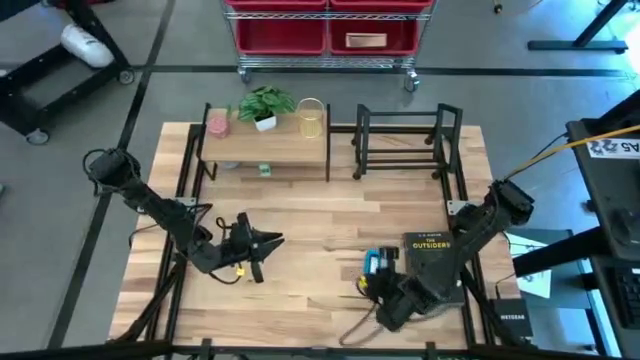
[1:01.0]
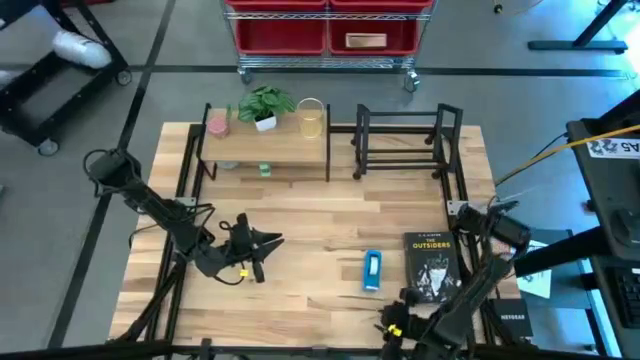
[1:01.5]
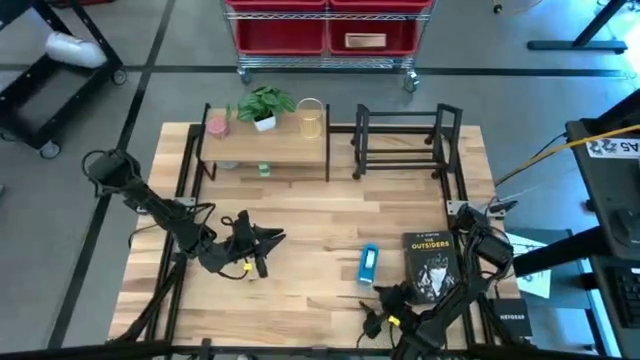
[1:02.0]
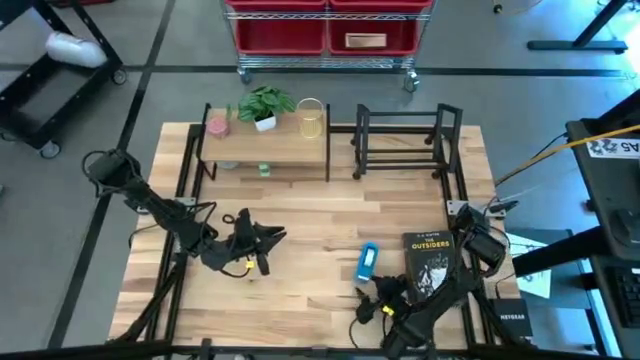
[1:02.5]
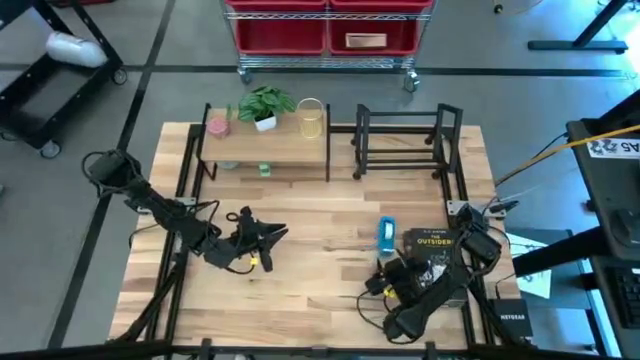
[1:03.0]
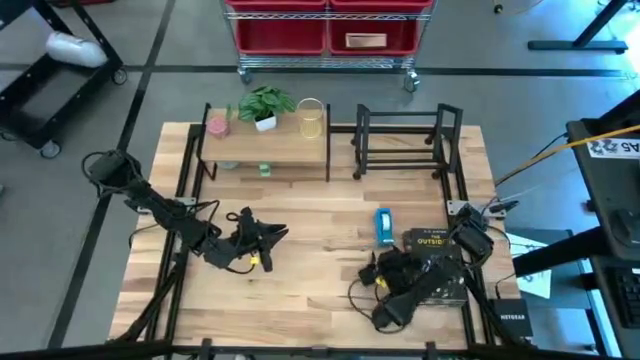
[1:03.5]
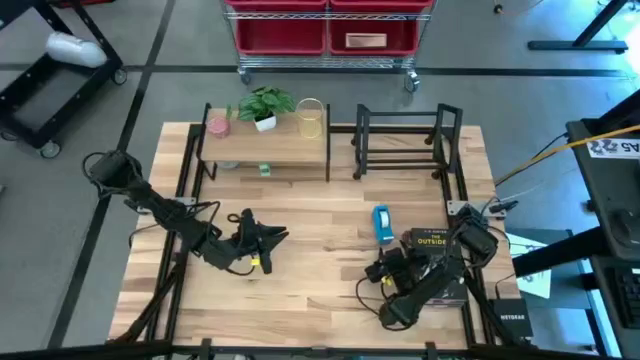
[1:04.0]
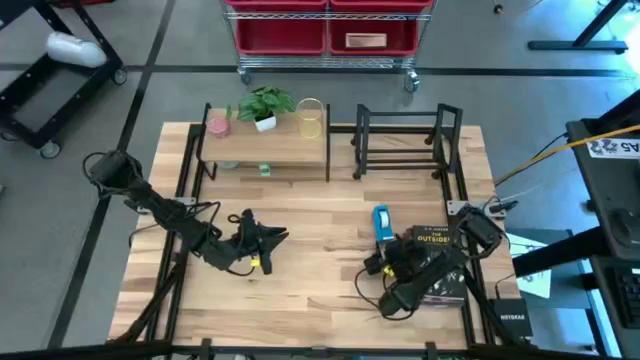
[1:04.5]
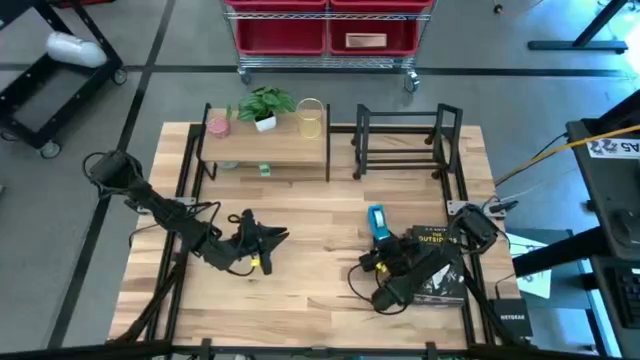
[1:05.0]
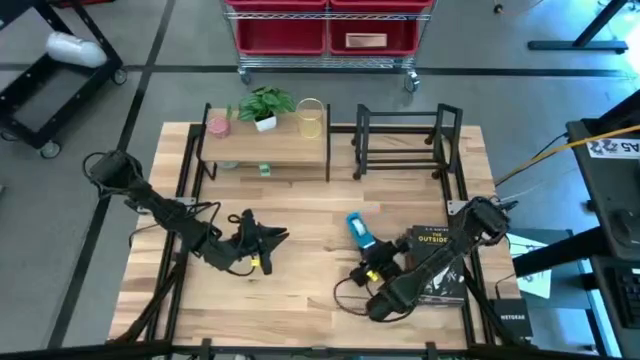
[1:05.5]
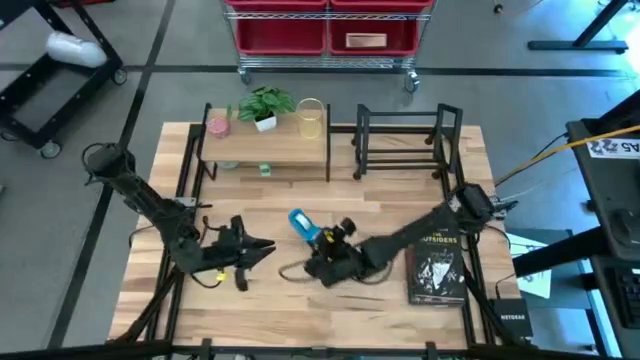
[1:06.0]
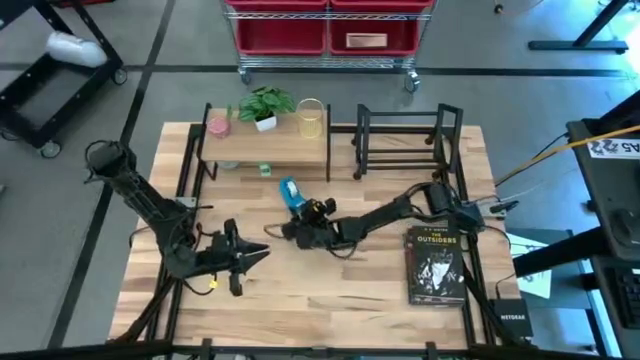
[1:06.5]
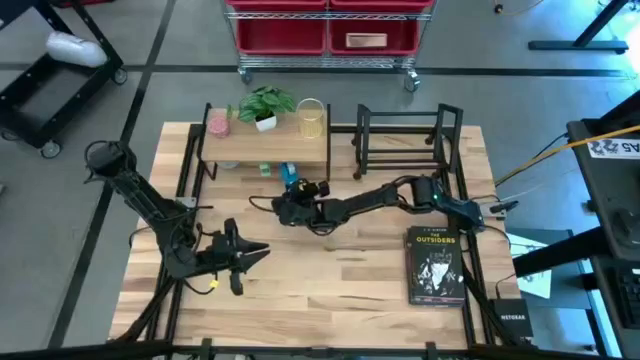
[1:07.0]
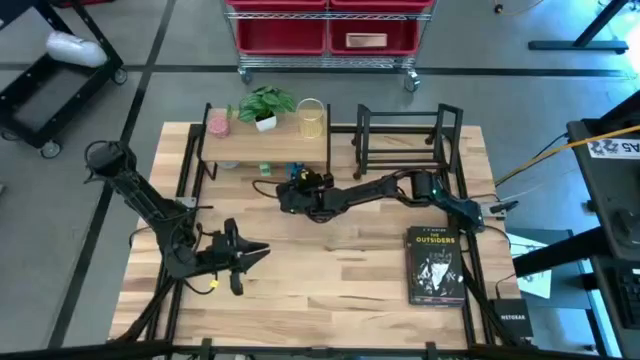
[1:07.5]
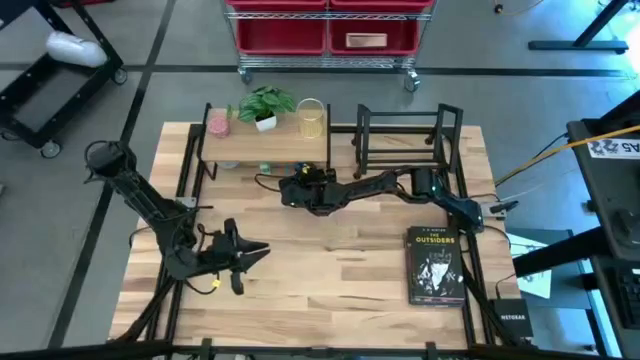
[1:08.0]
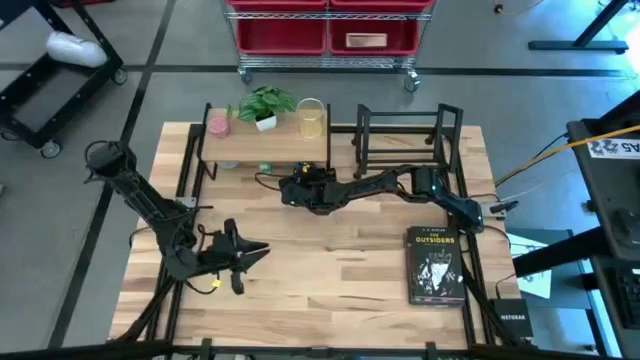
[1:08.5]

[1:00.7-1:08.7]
Task: Stock shelves
Put the blue tape dispenser under the shelf

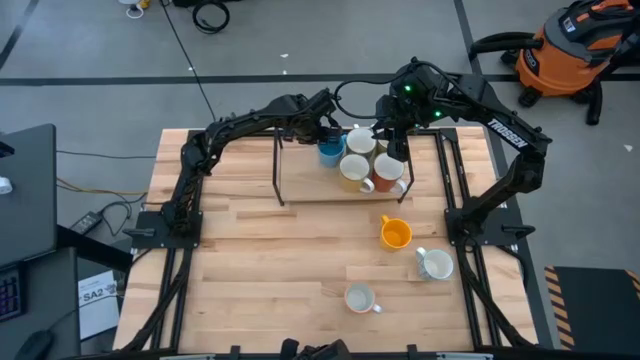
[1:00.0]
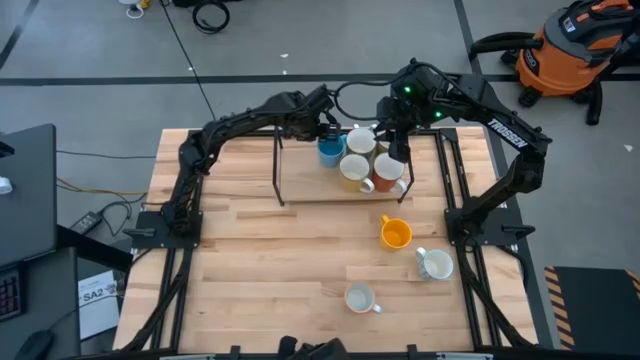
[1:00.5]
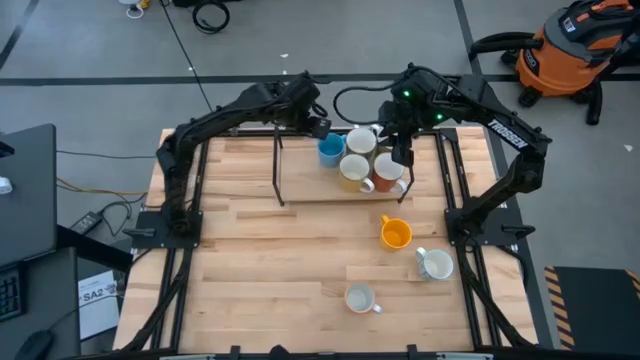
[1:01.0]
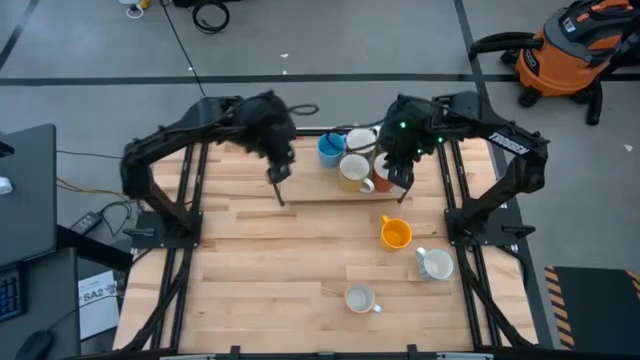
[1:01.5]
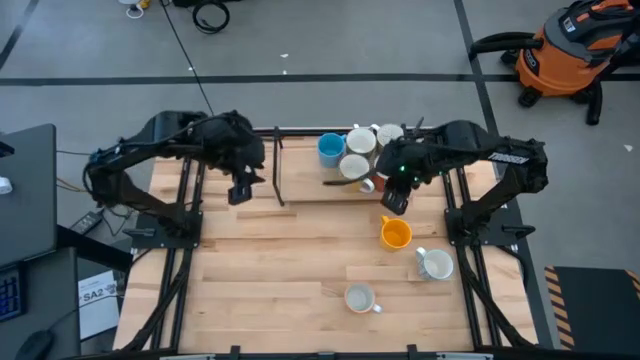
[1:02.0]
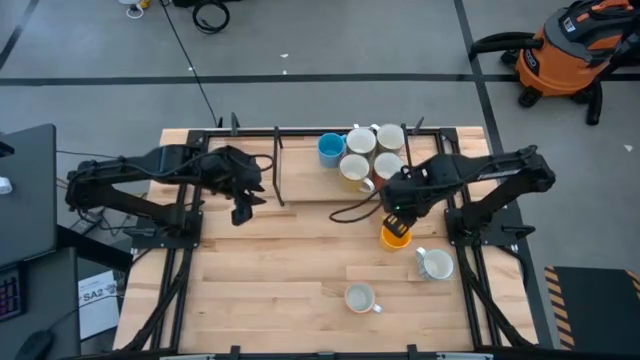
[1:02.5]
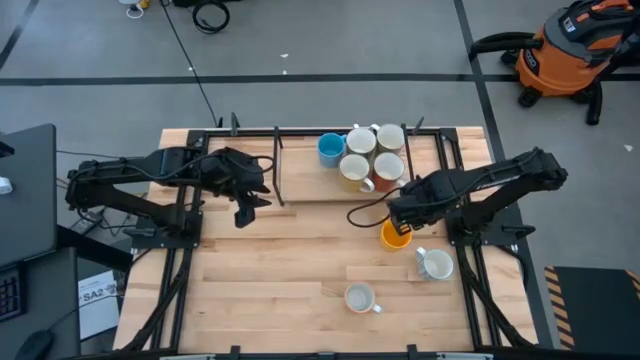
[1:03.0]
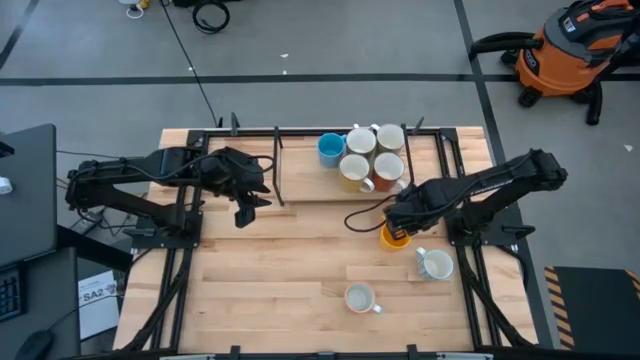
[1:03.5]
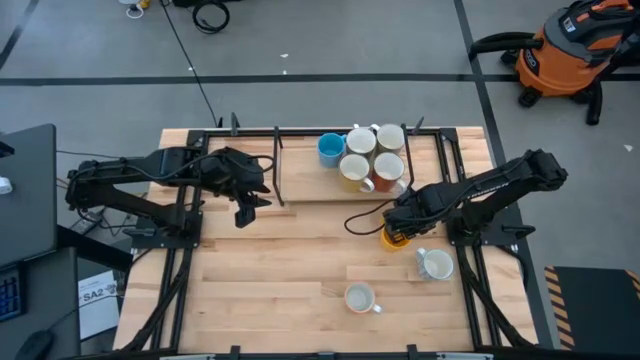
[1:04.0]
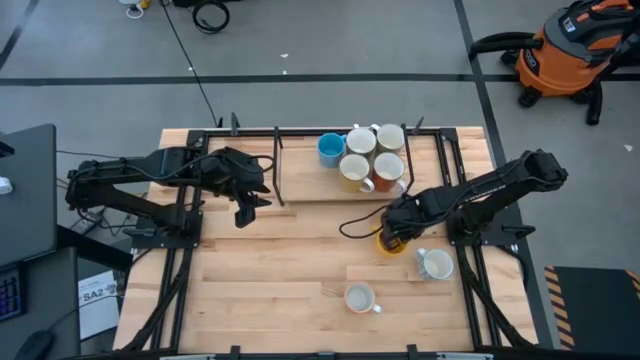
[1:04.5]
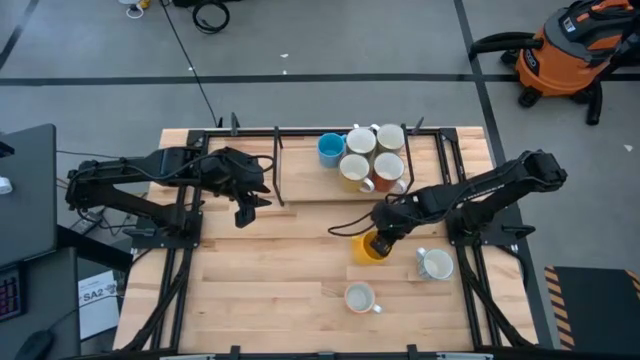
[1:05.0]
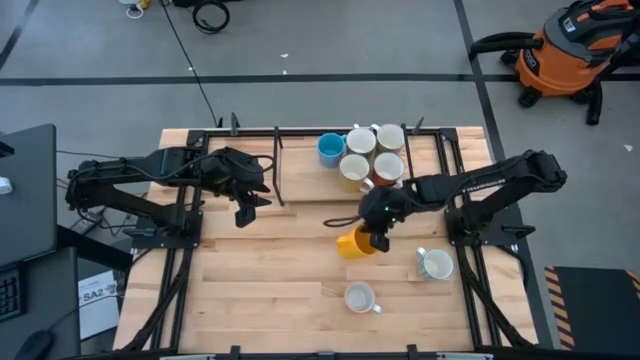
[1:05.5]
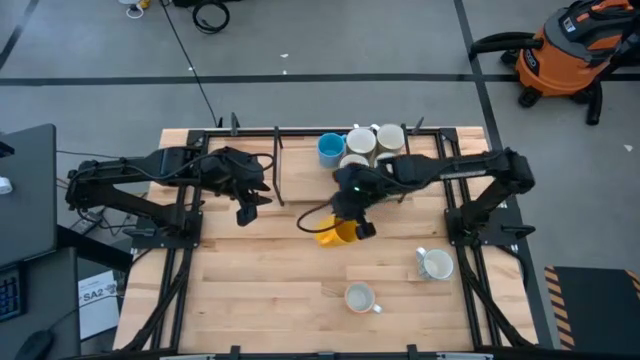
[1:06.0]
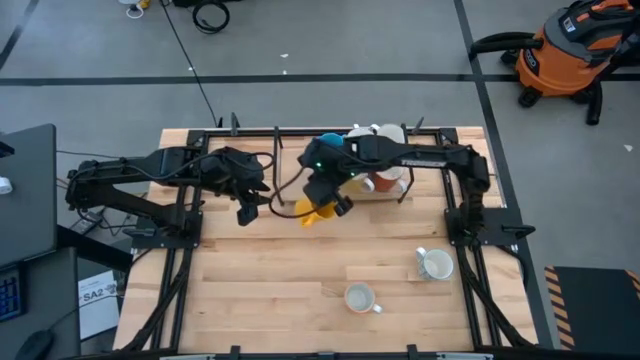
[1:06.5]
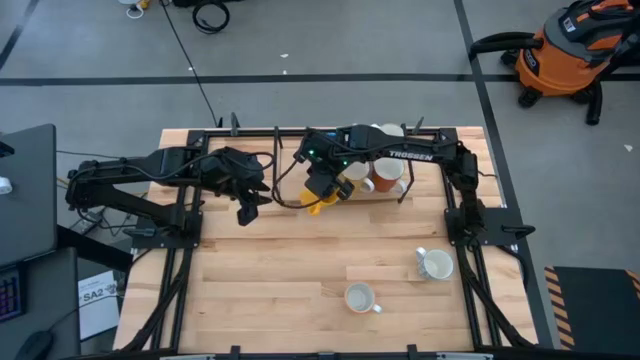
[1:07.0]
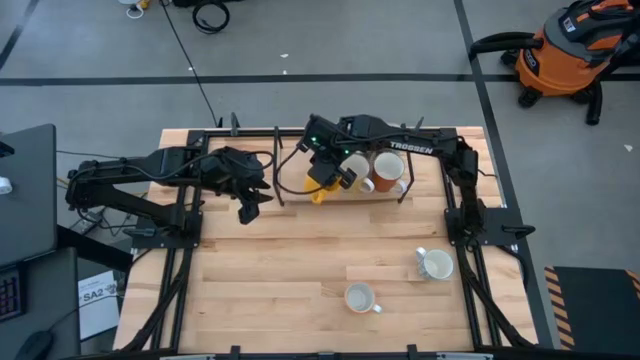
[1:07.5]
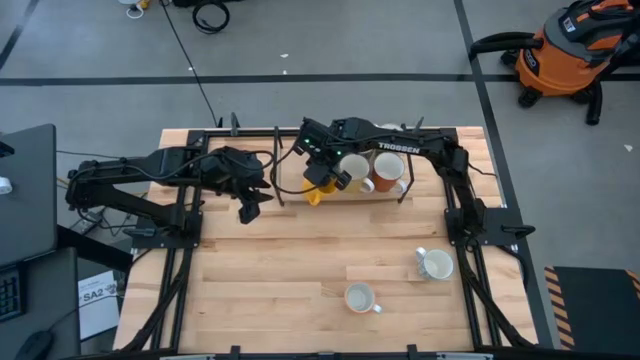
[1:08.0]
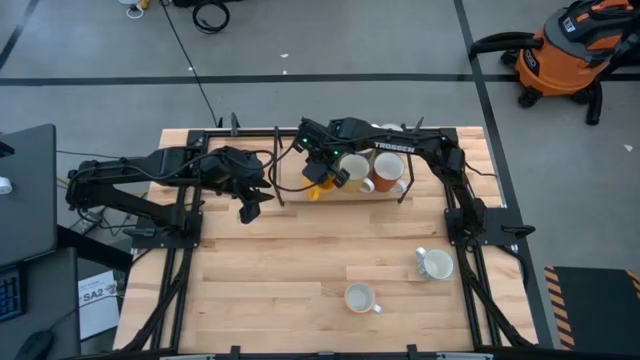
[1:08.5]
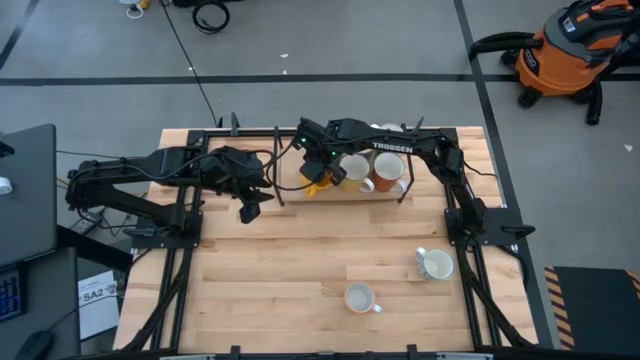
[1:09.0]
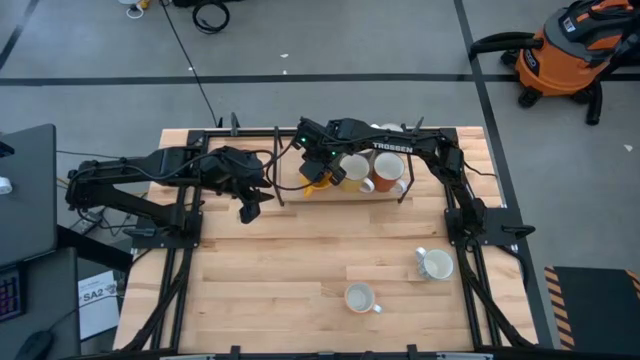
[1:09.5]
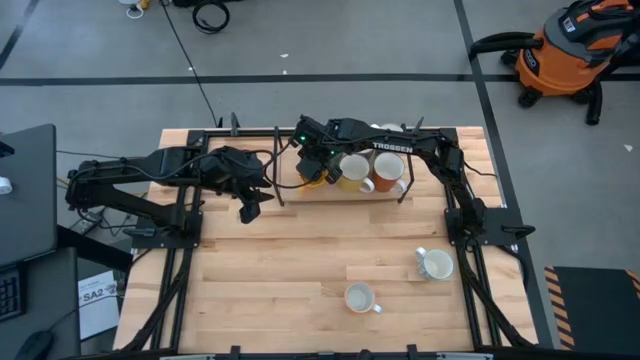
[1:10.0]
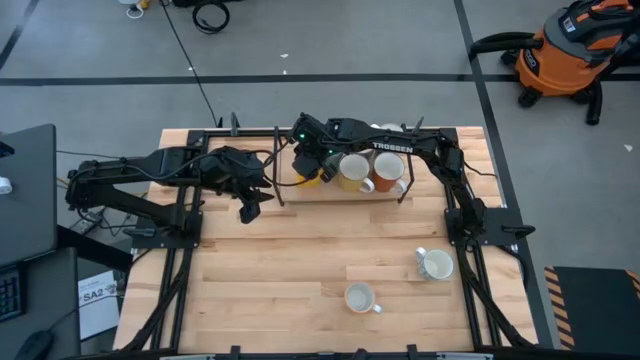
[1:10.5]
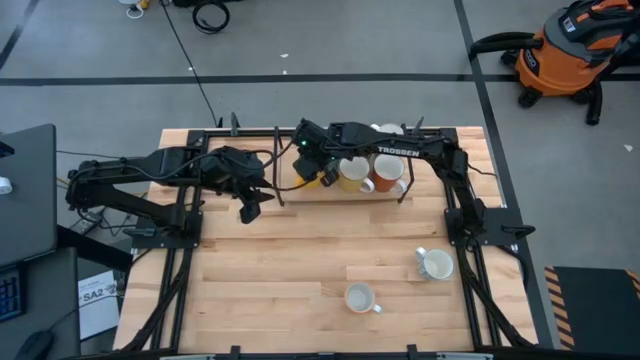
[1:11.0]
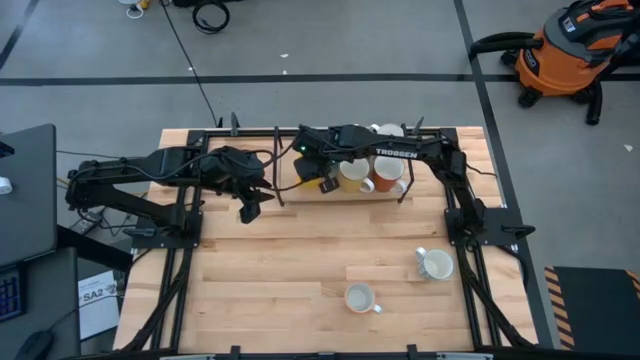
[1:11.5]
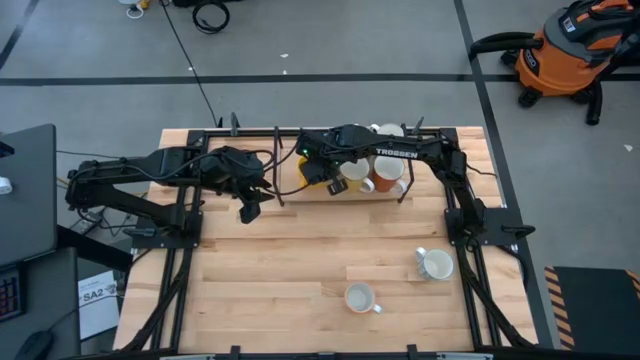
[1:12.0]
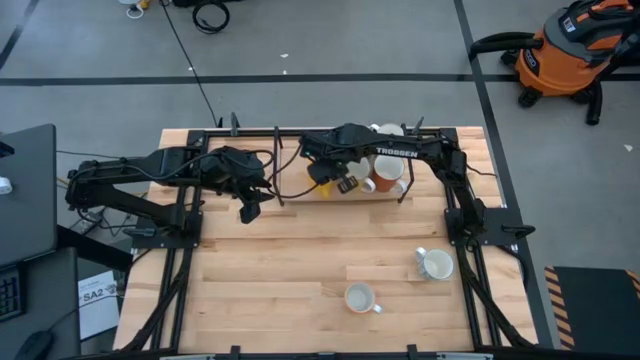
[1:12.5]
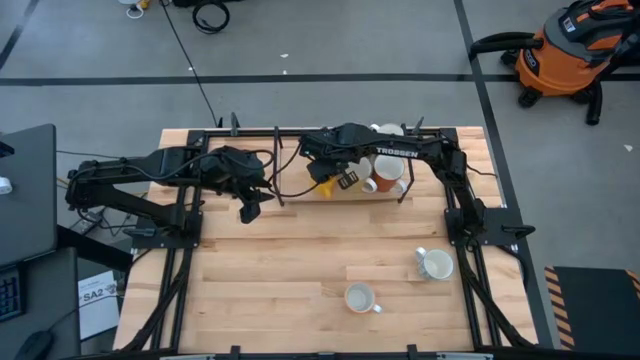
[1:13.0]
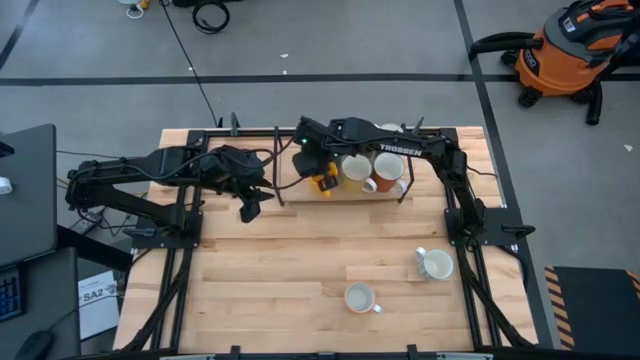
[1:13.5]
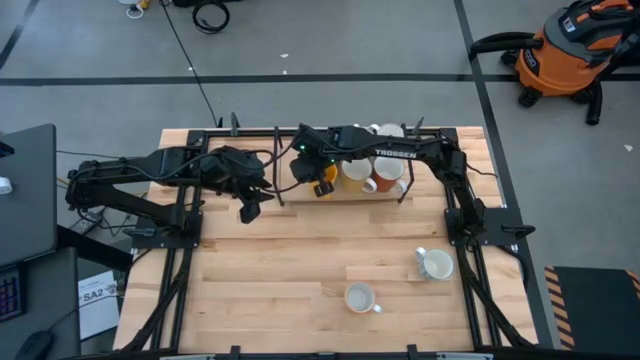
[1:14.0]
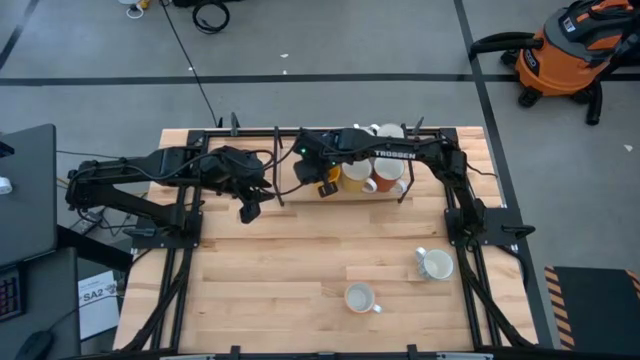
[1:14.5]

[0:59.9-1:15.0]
Task: Place coffee mugs
Put the topmost yellow cup on the shelf aligned with the blue cup
